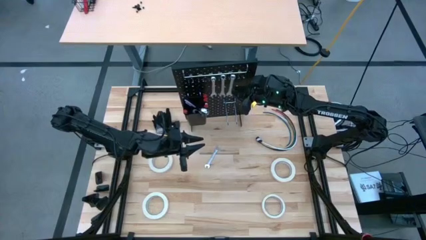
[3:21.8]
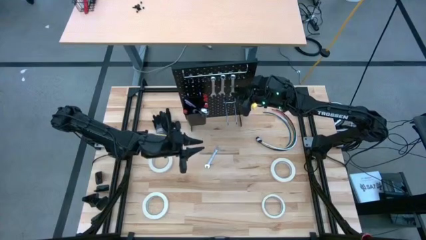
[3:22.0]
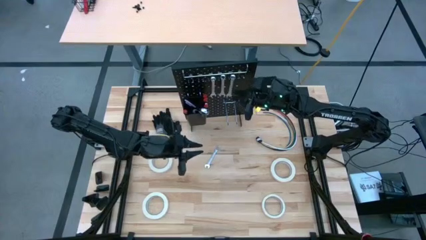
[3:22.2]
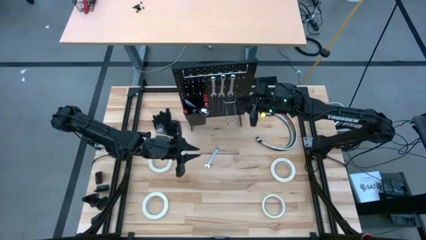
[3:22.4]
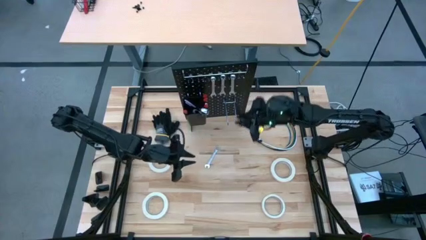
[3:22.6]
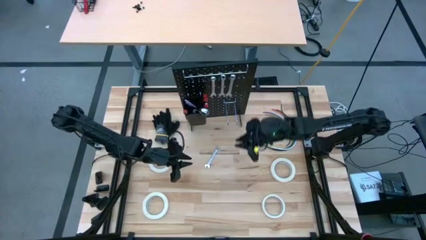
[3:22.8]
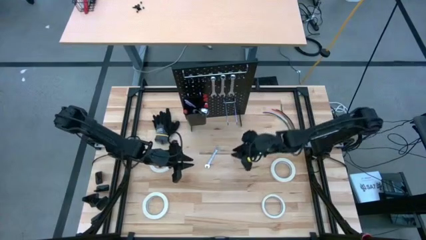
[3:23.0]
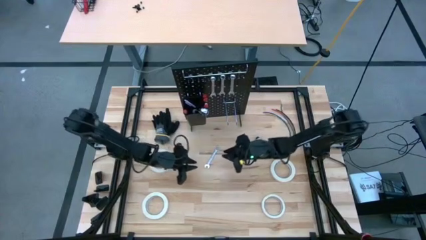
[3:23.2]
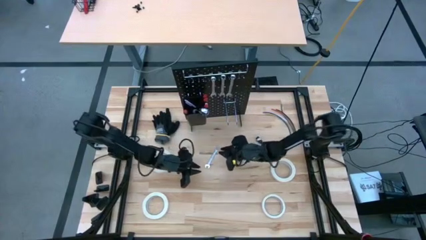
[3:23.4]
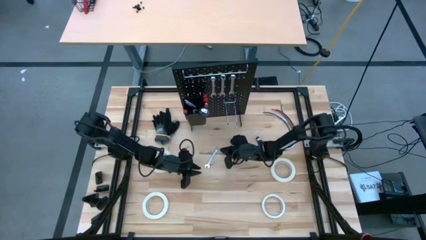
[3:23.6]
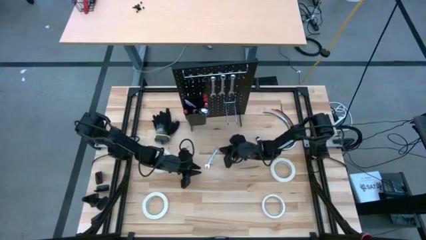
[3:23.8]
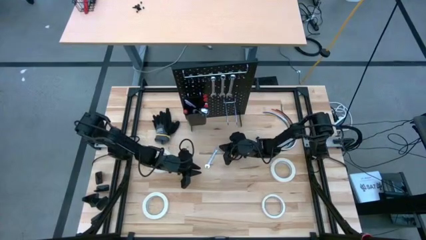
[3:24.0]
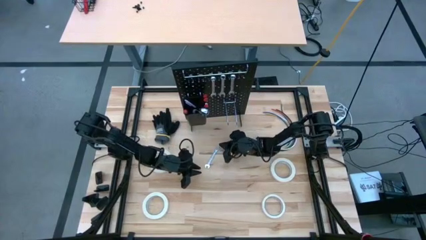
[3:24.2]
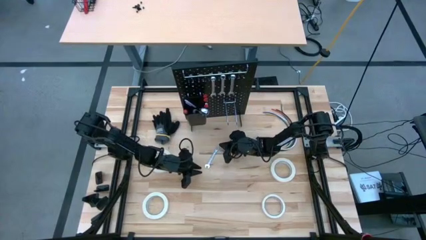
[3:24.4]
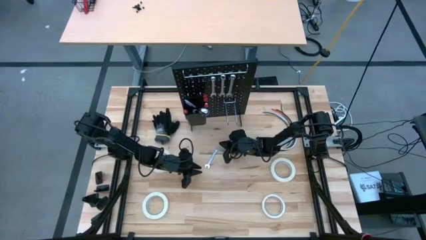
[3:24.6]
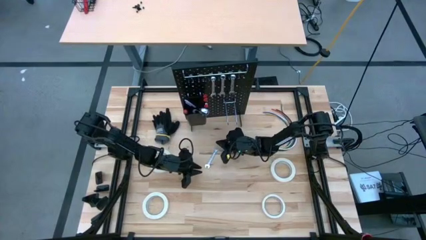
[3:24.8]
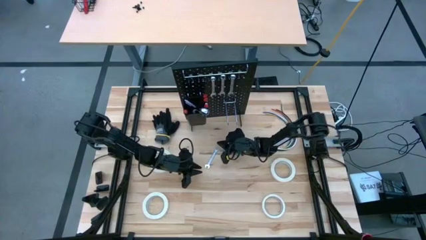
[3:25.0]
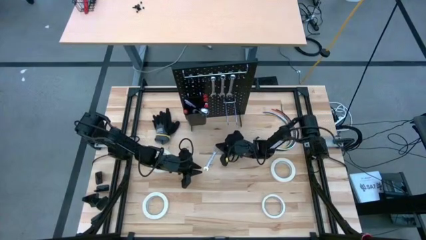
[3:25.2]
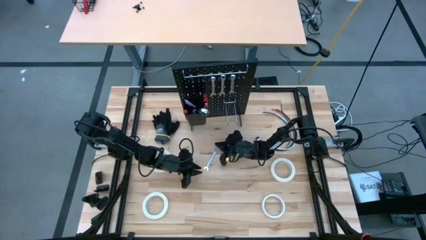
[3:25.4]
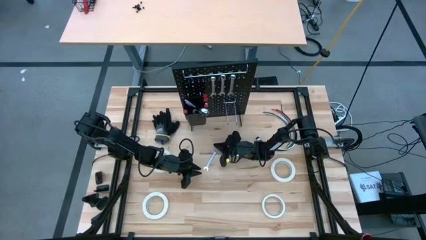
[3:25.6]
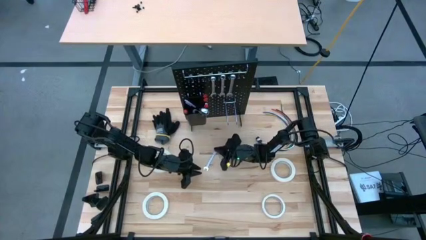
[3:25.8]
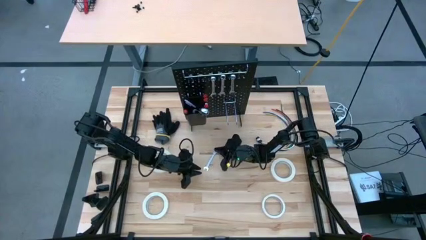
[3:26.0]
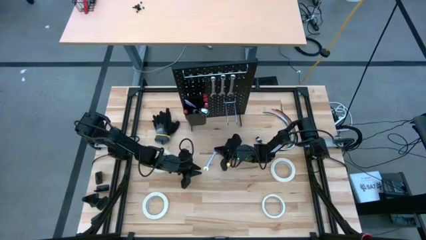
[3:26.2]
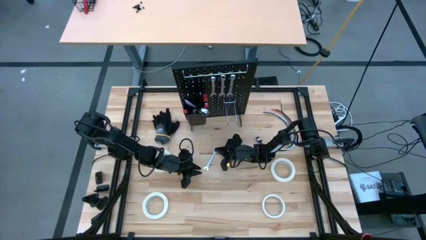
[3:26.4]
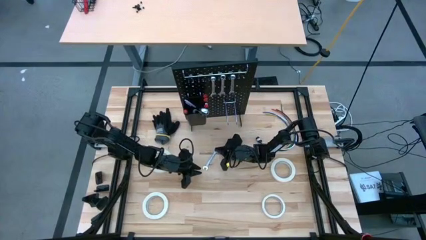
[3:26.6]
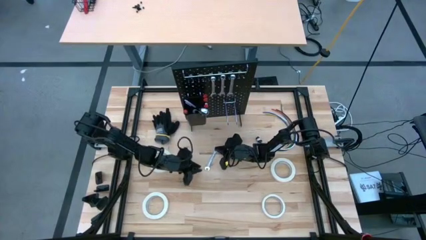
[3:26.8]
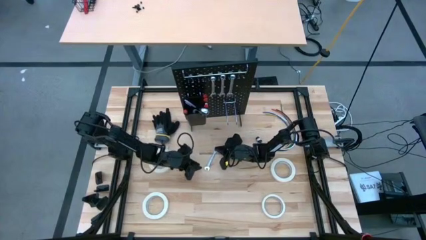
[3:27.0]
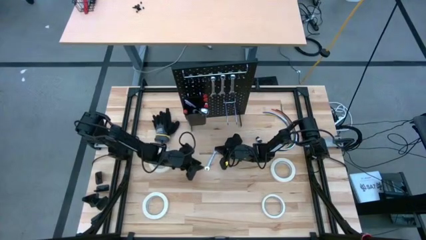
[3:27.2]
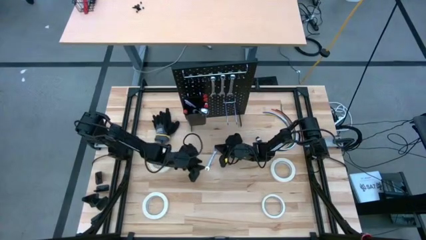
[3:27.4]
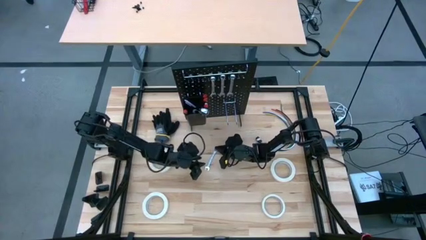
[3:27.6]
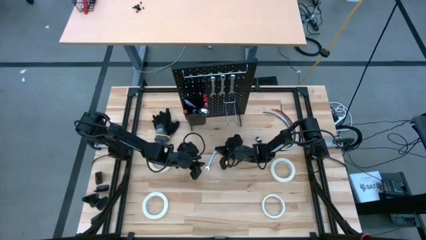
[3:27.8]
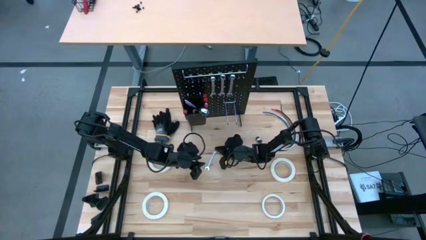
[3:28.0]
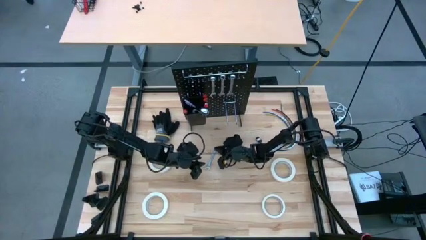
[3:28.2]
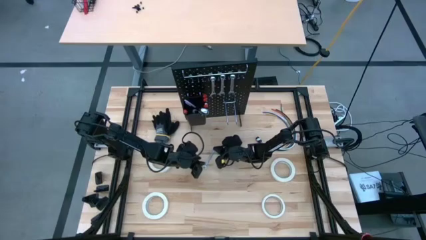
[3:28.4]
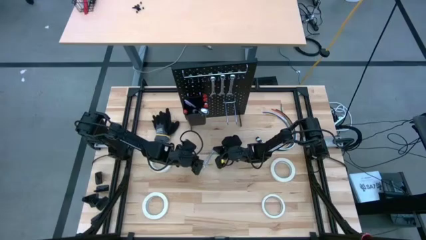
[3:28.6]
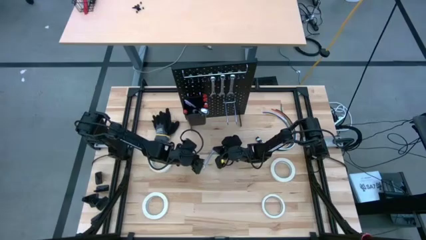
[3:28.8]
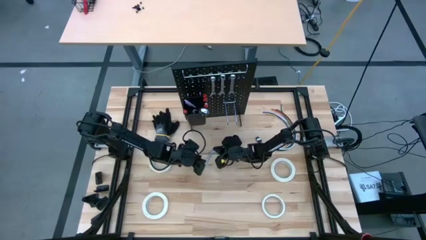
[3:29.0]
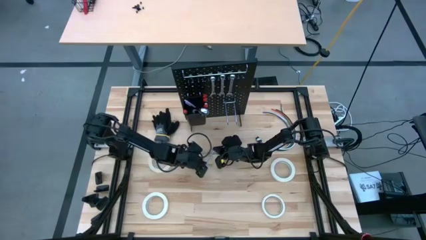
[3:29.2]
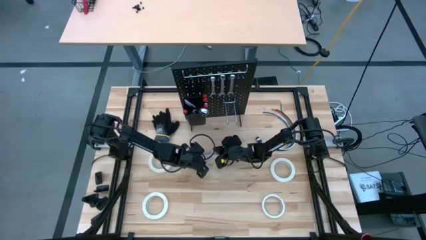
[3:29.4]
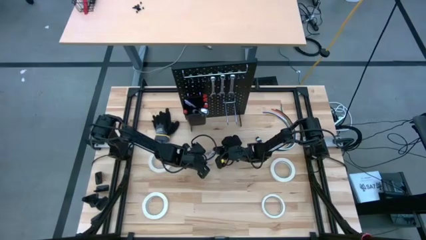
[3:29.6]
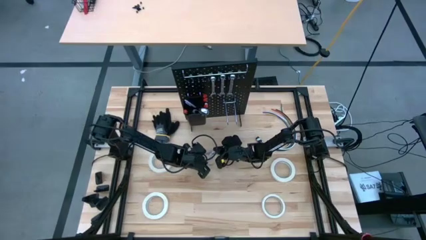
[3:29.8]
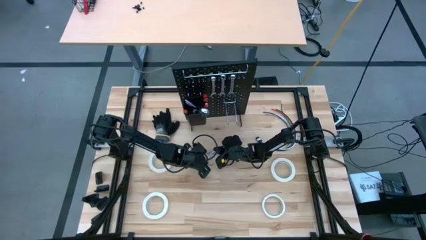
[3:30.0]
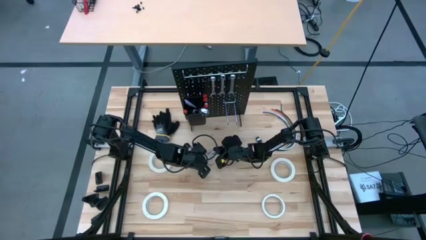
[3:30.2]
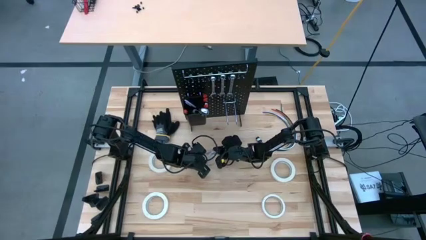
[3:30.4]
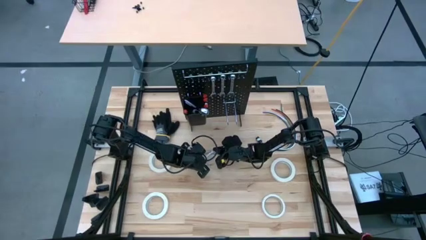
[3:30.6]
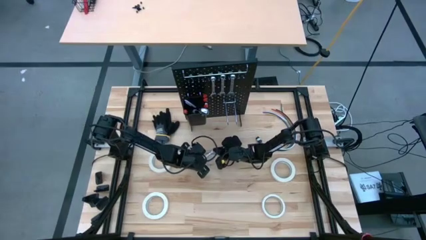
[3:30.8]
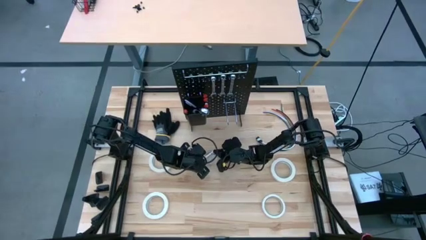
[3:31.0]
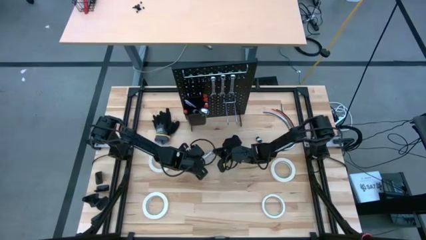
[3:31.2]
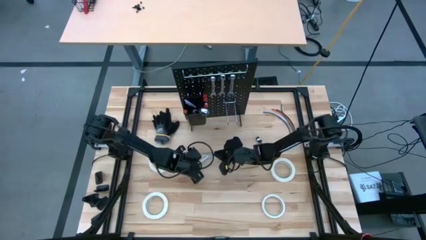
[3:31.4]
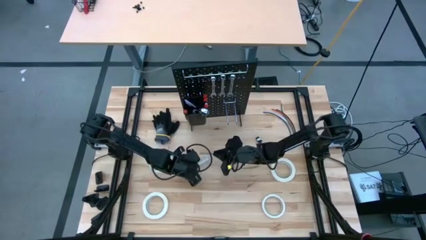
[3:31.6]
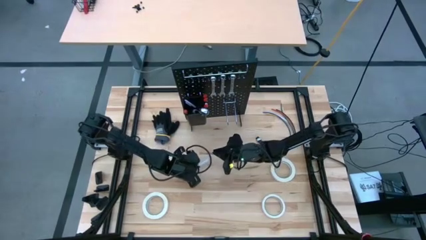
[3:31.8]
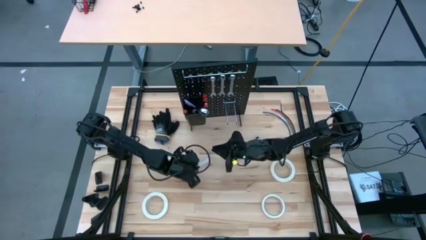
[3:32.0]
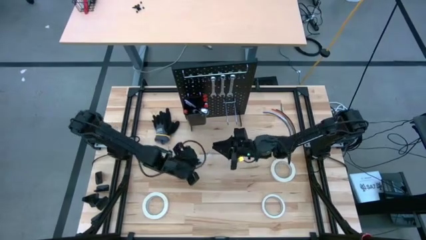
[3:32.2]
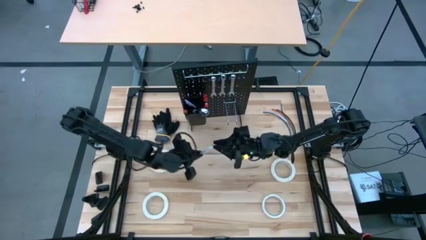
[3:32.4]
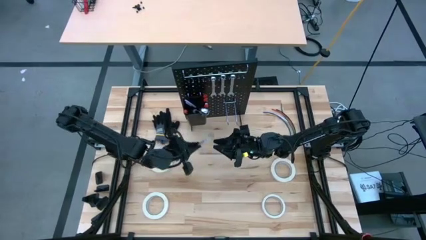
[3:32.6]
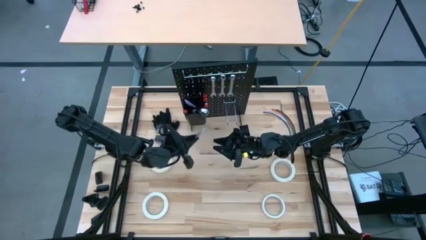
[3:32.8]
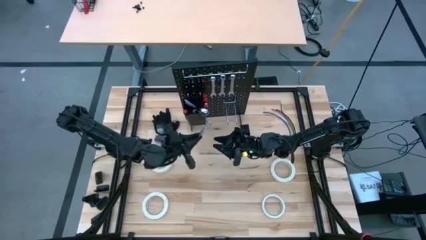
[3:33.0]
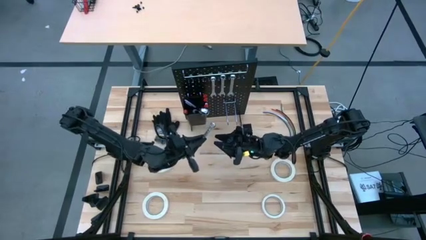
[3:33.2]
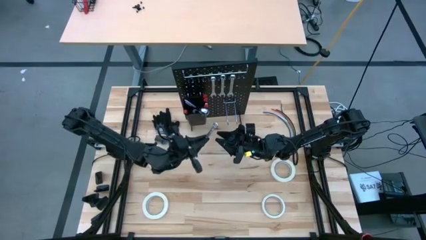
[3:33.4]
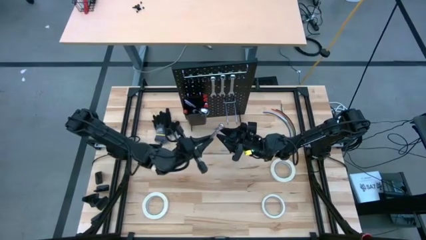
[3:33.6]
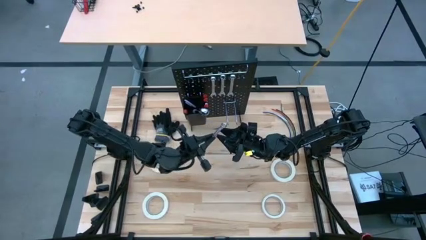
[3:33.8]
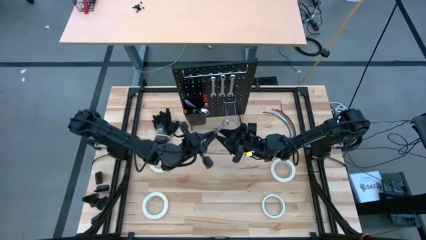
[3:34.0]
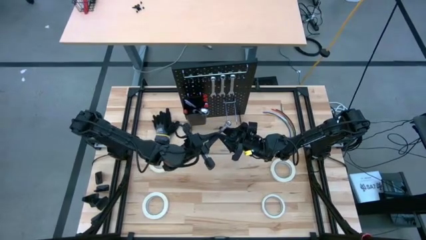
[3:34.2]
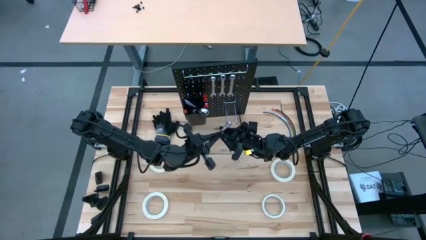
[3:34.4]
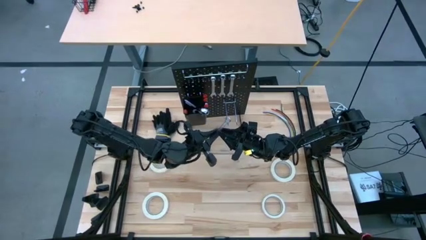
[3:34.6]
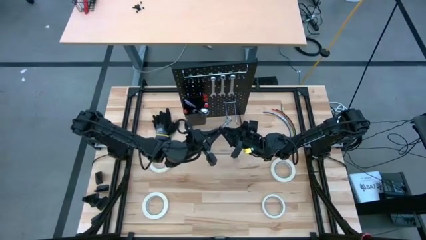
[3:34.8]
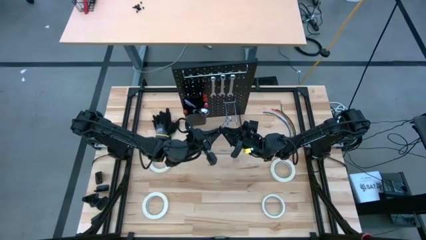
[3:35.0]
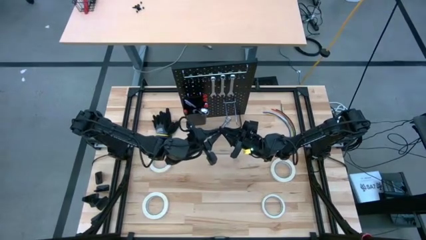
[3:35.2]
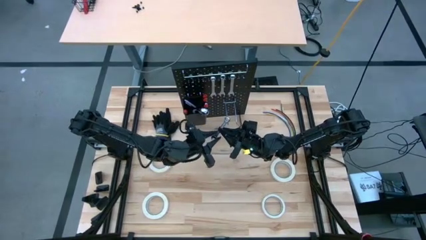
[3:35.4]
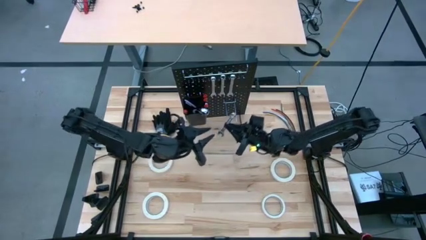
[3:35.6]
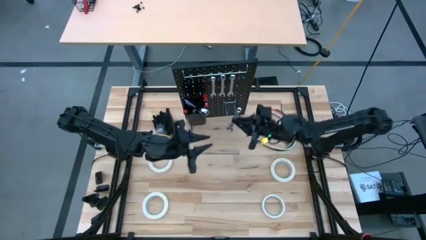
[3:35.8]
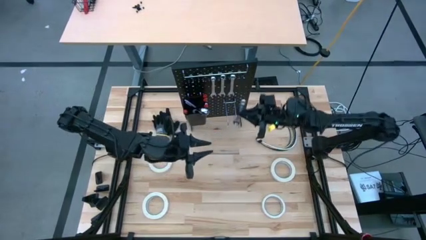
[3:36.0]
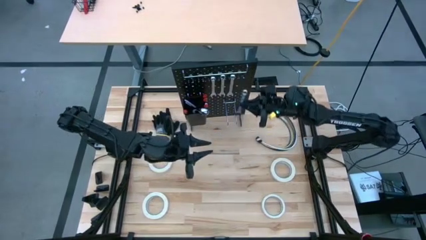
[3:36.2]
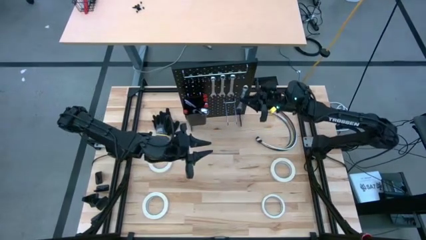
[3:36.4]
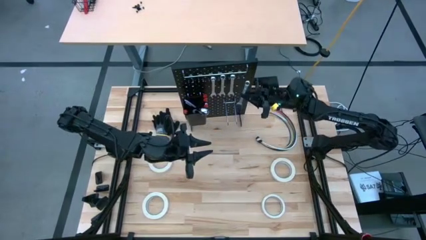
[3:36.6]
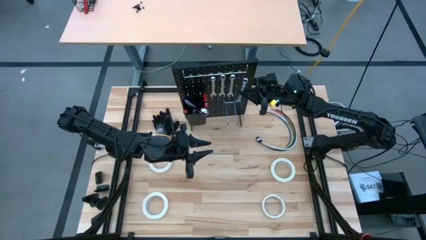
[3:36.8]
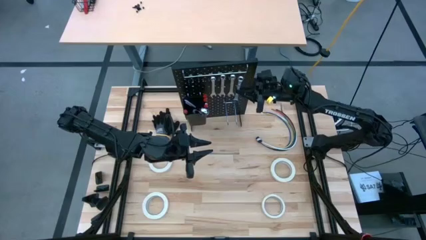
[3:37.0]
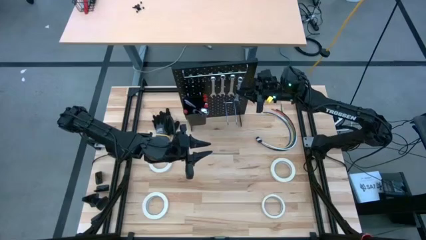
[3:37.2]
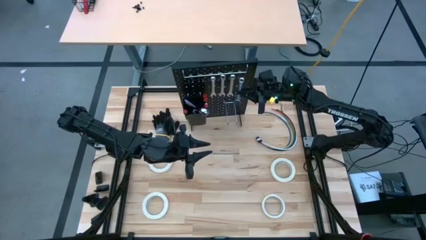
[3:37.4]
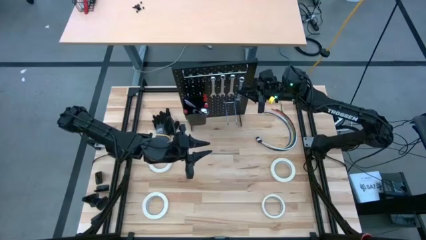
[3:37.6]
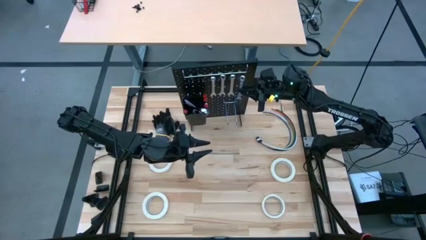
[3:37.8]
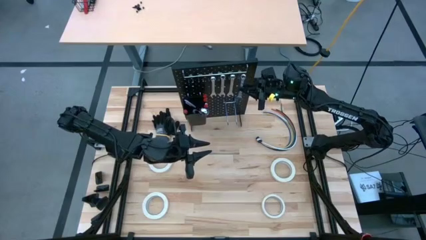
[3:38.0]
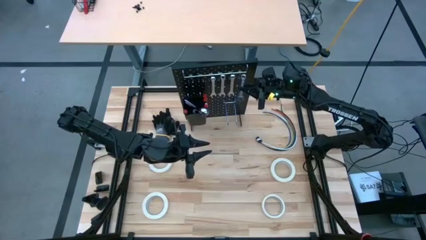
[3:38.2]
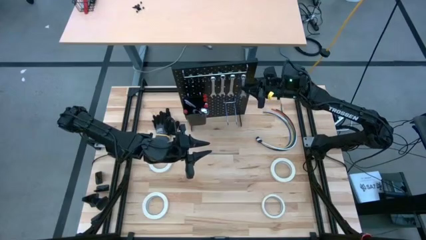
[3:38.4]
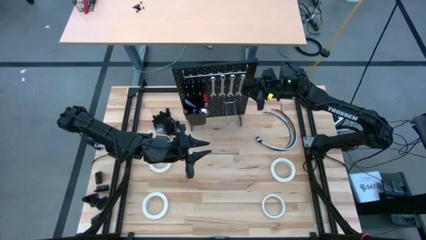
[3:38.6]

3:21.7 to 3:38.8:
Task: Hang tools onto peg board
Hang the wrench on the peg board
